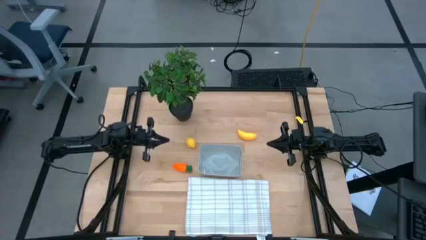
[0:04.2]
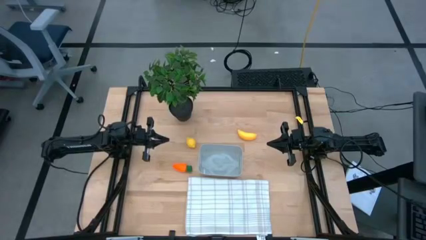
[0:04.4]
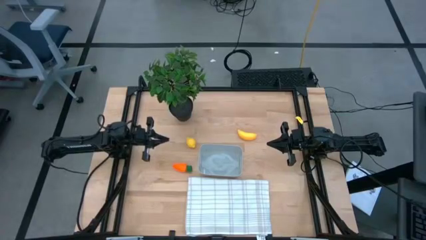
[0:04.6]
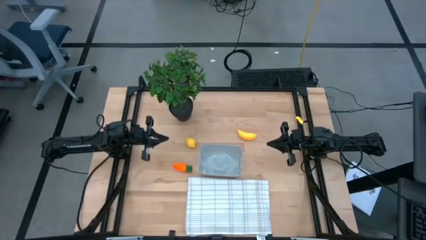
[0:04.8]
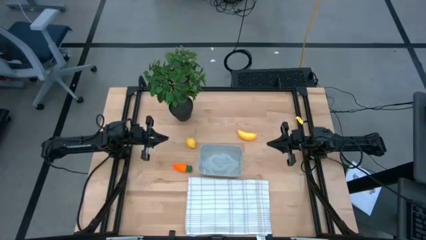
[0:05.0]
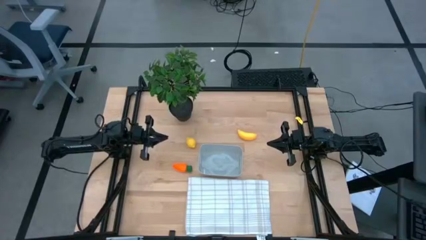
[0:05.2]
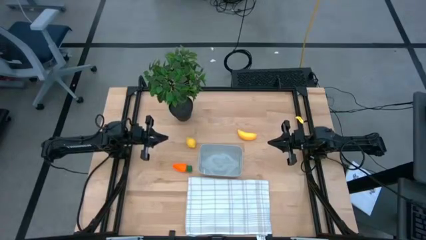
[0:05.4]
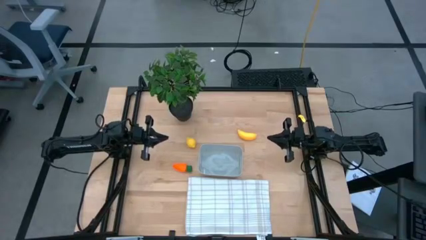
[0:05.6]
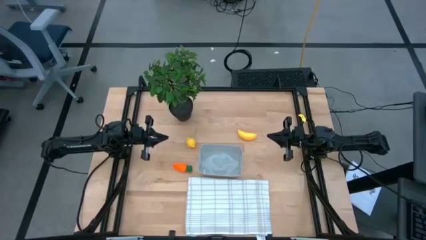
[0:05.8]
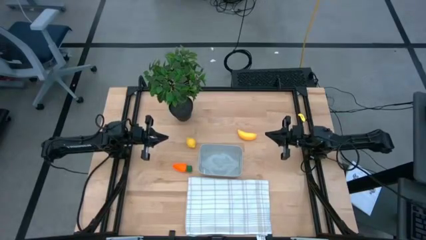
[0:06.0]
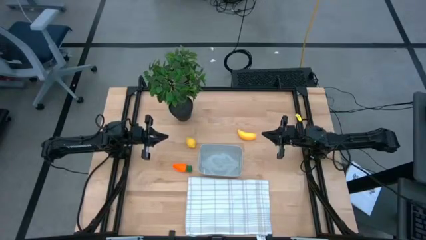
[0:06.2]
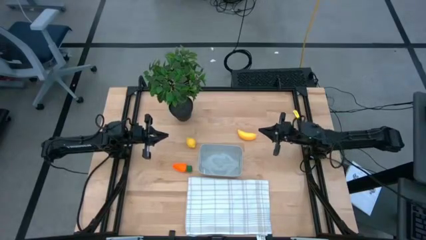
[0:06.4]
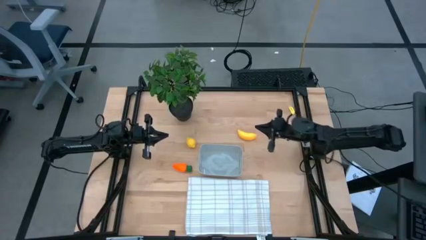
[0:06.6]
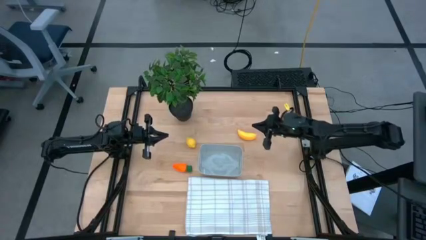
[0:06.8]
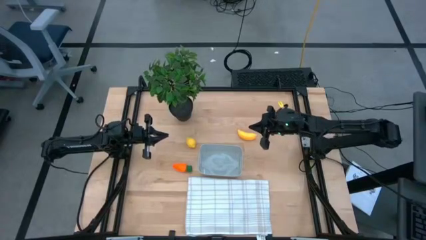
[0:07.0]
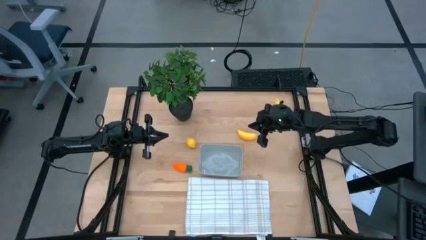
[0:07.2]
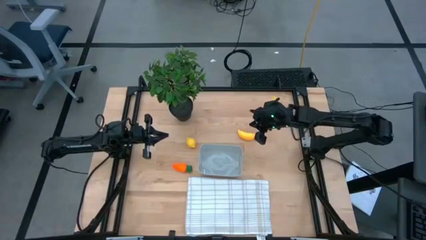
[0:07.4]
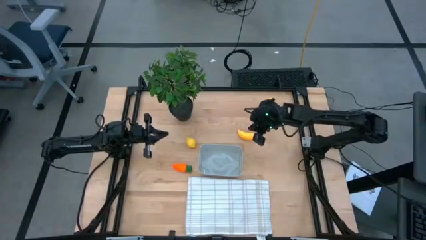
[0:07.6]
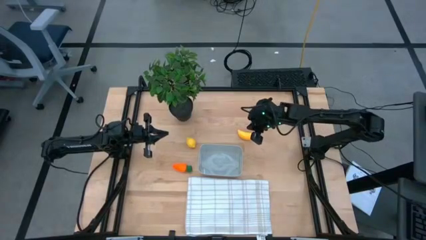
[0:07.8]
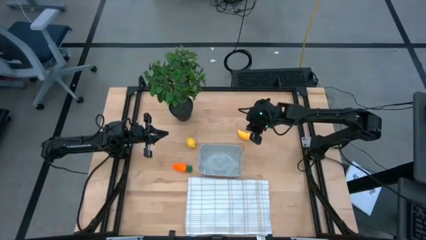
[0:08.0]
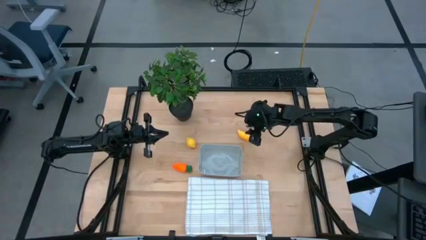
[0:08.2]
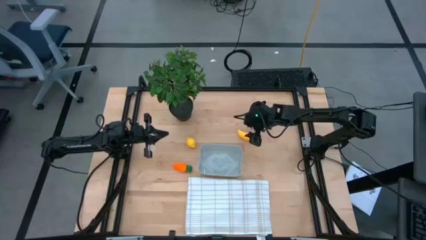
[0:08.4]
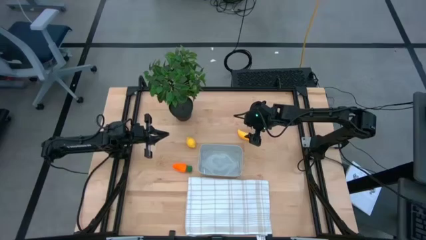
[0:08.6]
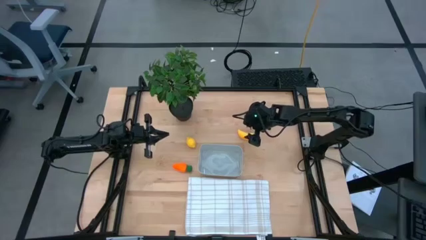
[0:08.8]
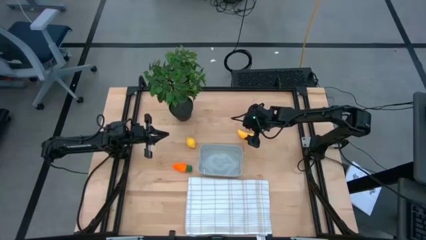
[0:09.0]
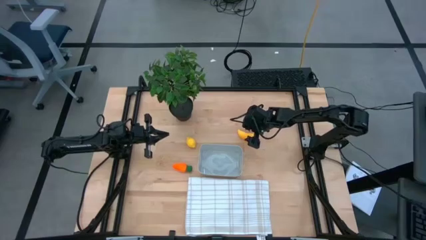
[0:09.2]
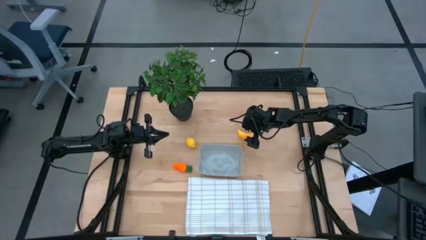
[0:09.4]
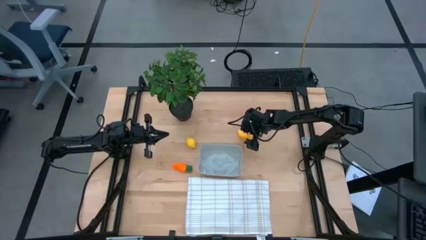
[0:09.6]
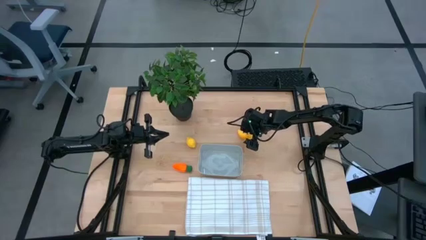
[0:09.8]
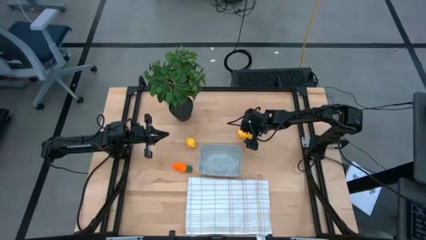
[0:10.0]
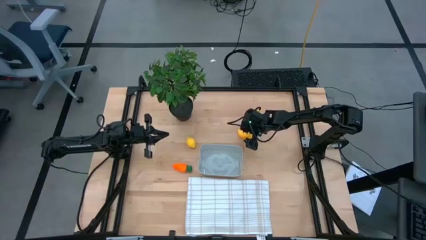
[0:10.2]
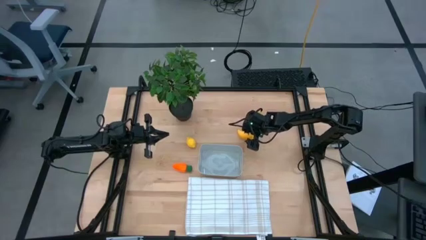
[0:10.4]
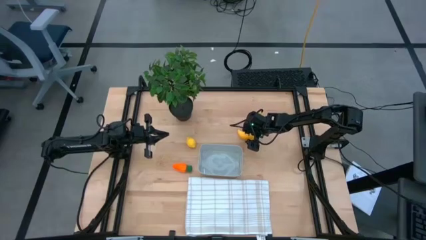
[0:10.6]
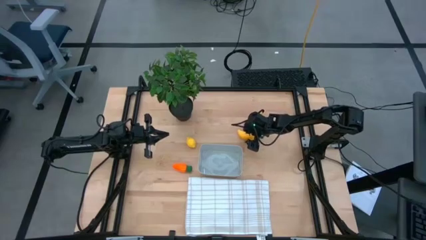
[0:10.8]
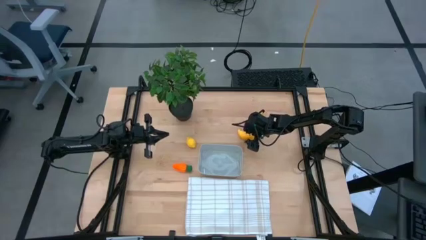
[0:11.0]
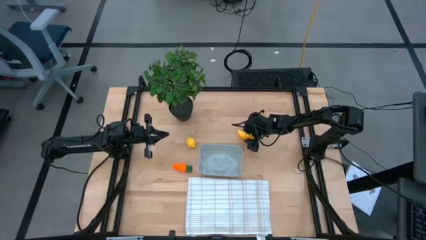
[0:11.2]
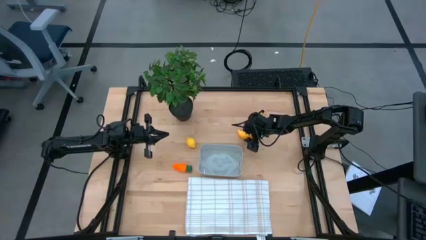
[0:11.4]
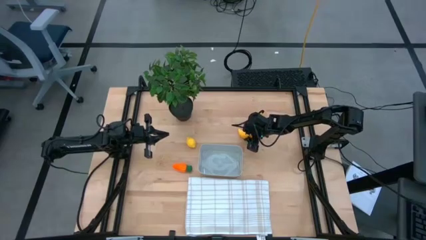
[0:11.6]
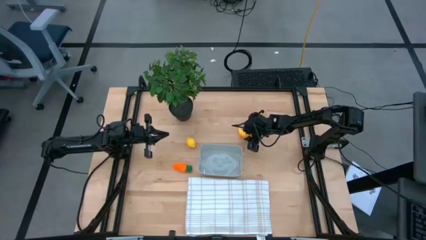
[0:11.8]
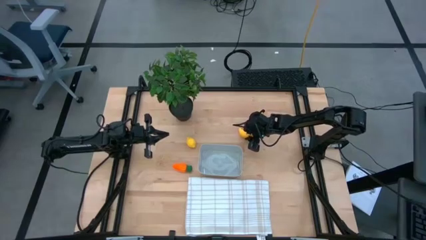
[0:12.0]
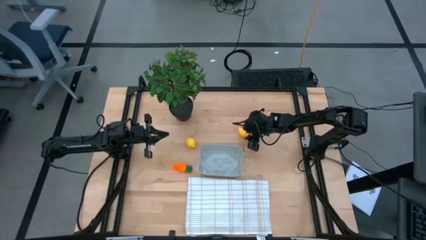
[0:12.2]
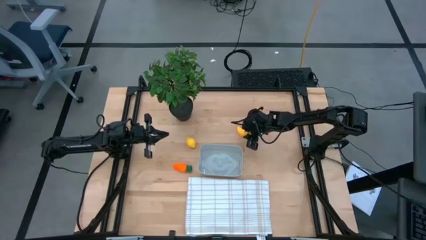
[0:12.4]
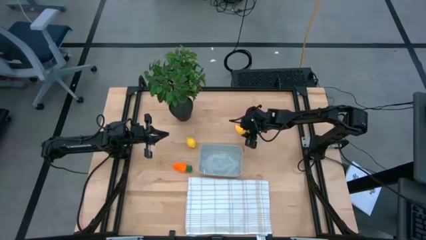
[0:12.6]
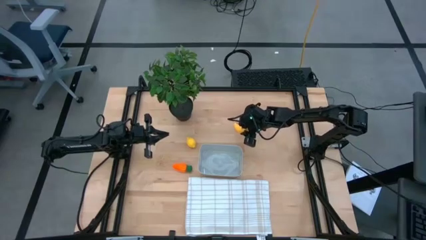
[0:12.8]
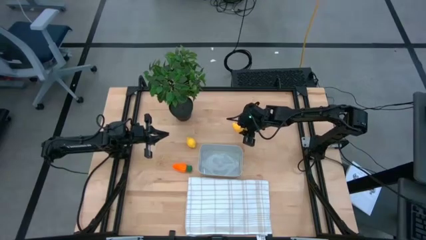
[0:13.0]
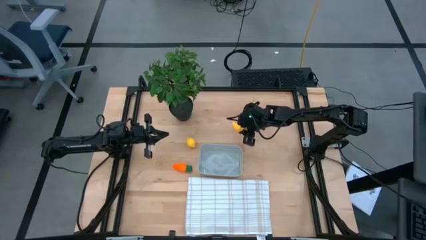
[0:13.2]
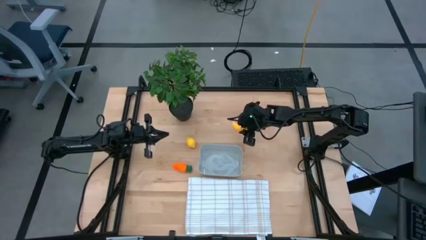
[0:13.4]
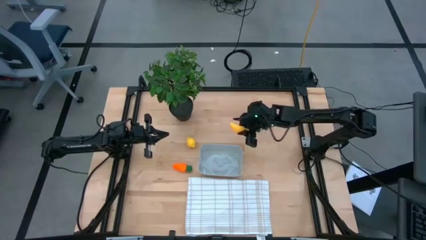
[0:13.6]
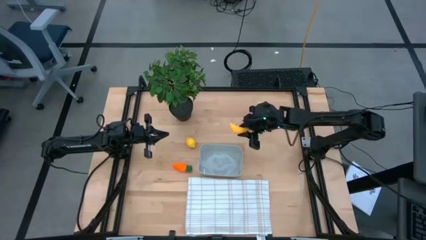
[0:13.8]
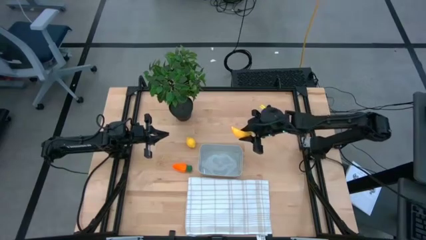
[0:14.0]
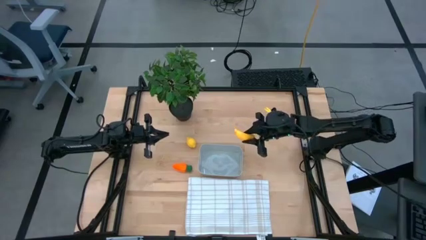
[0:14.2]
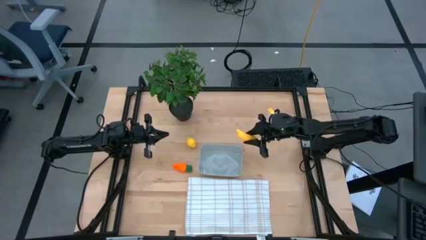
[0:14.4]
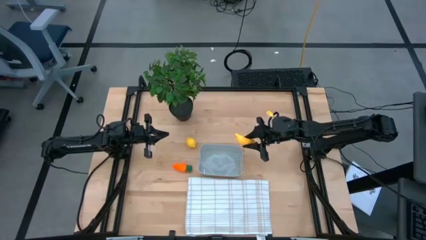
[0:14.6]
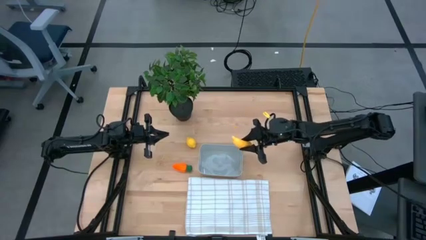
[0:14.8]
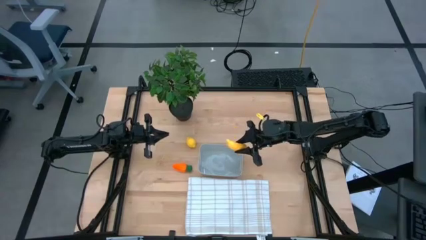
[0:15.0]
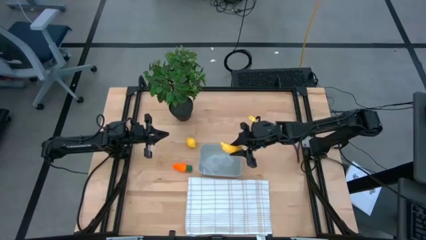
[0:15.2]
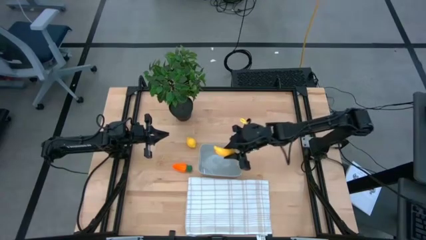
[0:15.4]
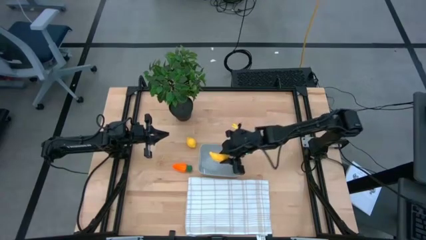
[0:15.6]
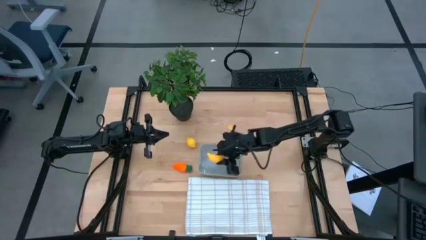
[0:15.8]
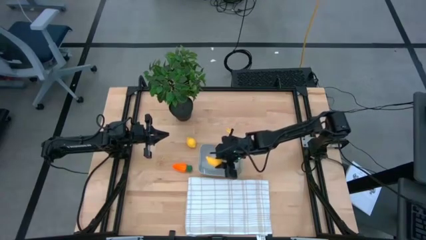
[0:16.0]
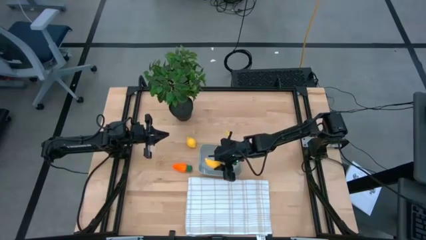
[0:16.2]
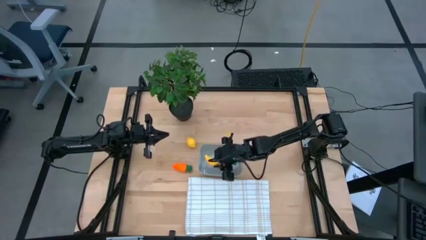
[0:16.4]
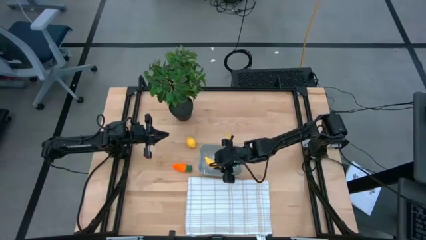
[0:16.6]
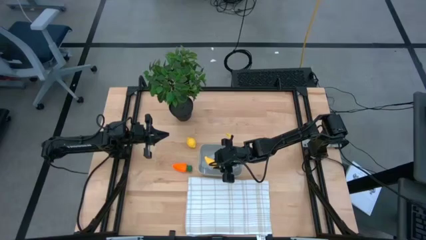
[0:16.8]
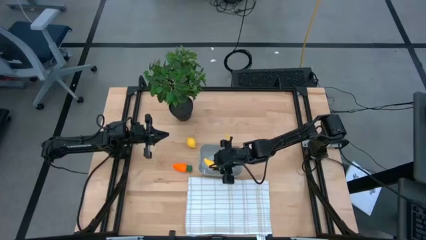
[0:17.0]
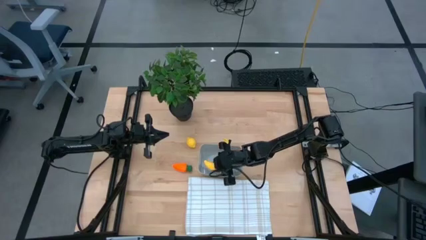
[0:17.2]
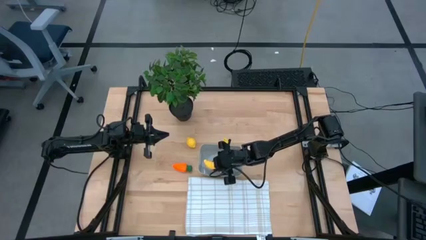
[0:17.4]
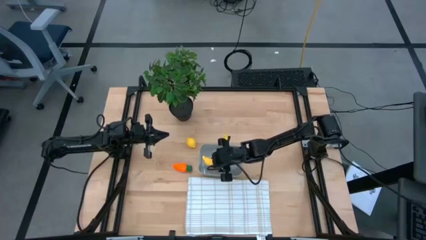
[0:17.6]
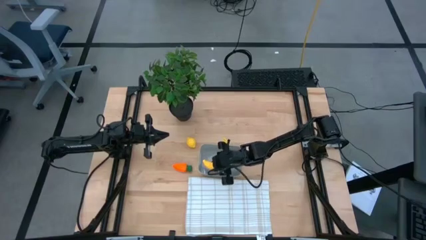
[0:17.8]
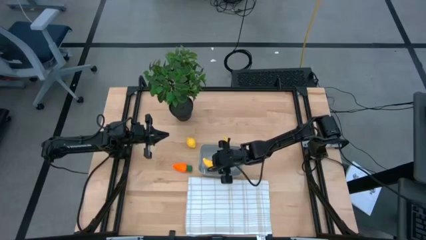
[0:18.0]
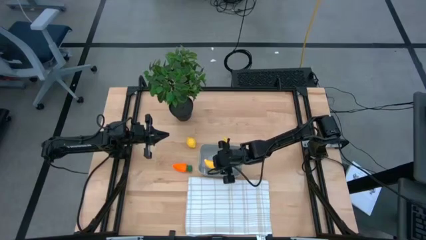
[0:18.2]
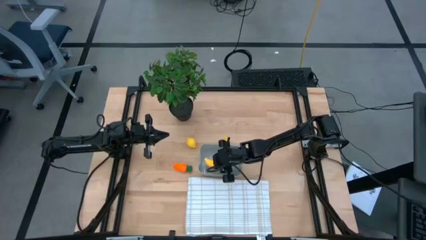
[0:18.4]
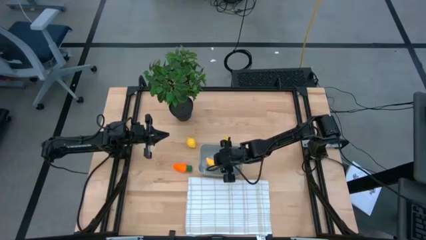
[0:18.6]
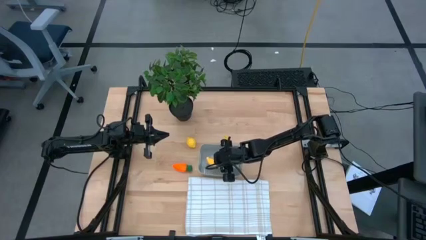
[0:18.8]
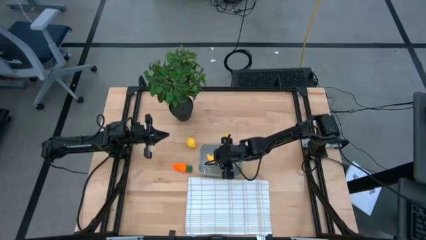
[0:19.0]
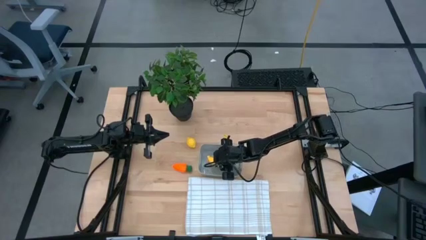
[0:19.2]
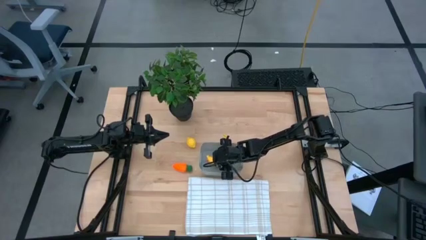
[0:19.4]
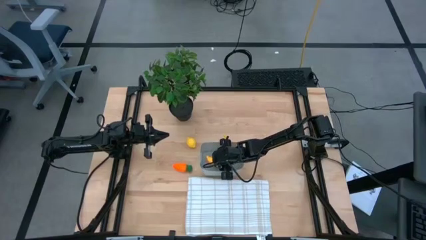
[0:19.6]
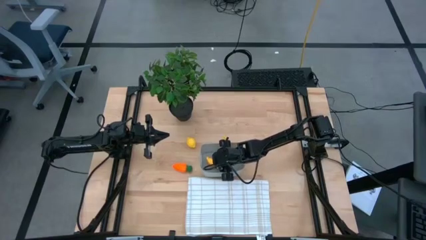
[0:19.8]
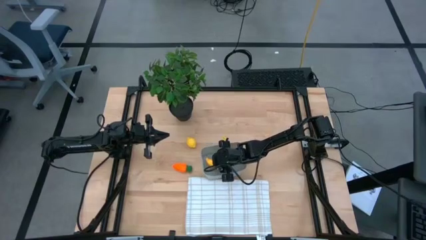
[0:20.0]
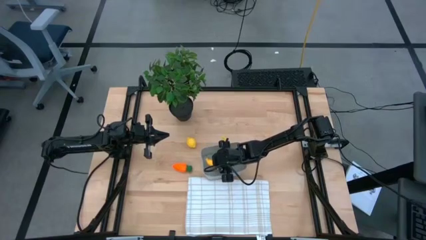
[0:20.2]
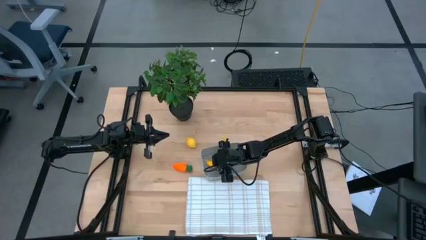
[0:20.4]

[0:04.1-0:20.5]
Task: Pick and placing Produce into tupperware
Put the yellow banana into the gray basket
